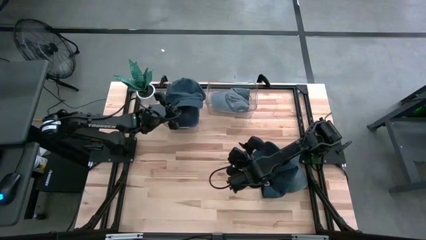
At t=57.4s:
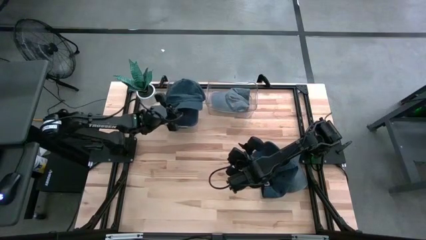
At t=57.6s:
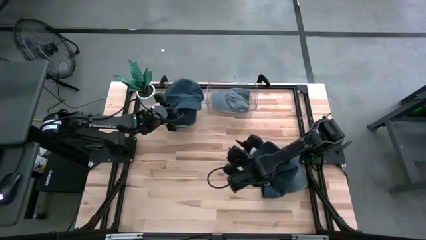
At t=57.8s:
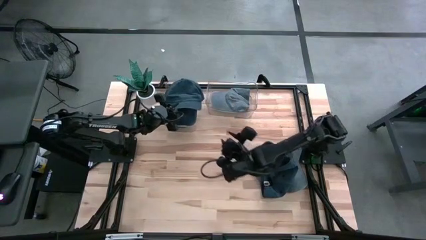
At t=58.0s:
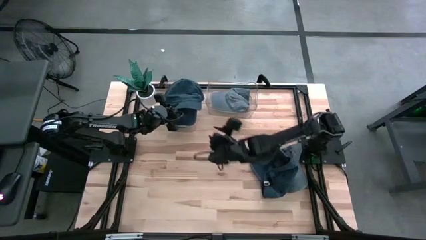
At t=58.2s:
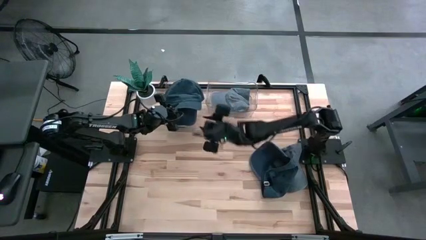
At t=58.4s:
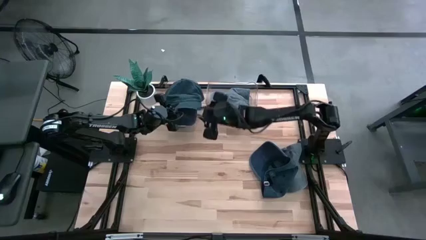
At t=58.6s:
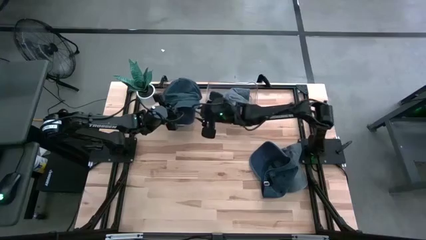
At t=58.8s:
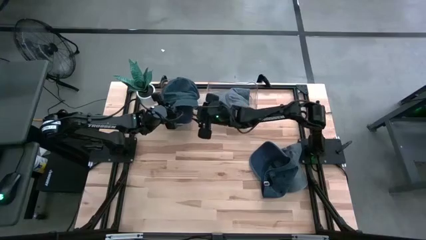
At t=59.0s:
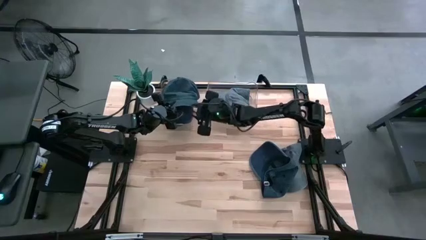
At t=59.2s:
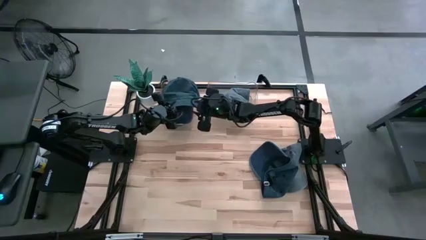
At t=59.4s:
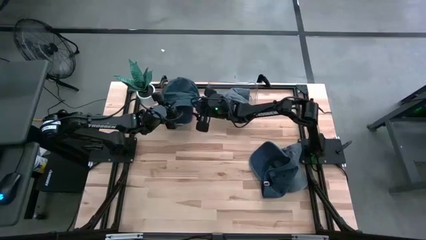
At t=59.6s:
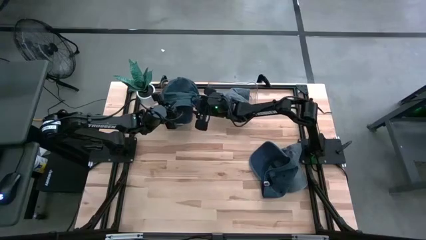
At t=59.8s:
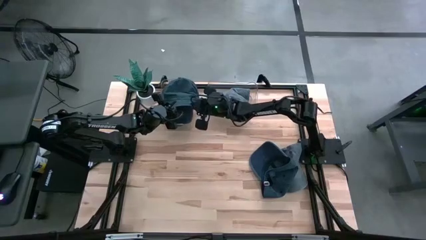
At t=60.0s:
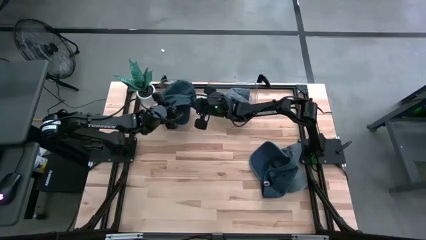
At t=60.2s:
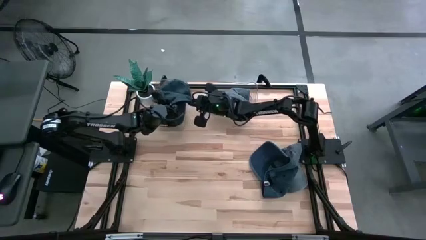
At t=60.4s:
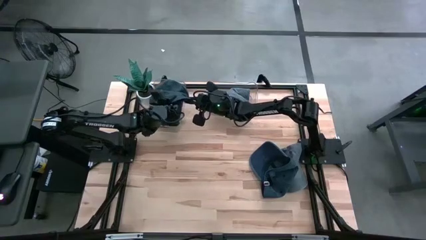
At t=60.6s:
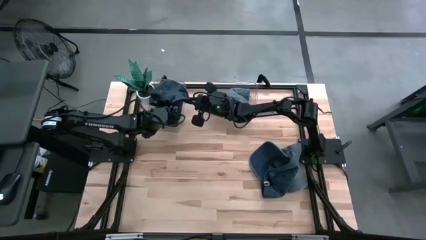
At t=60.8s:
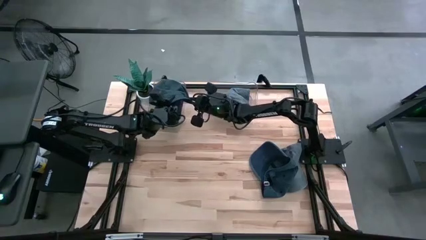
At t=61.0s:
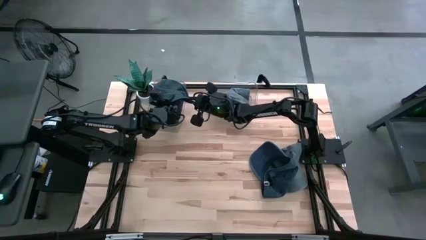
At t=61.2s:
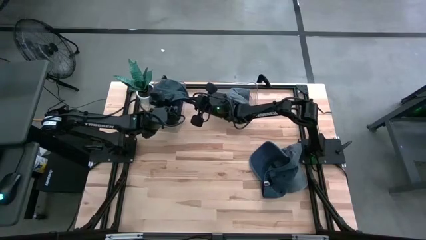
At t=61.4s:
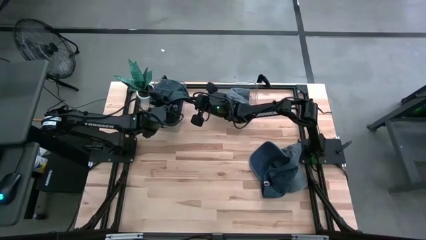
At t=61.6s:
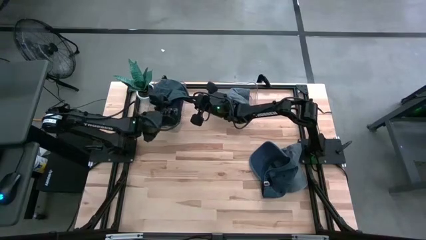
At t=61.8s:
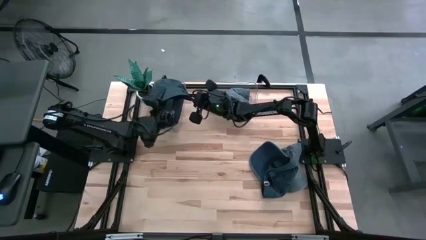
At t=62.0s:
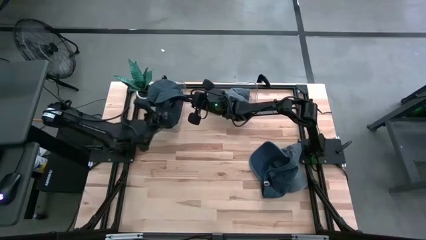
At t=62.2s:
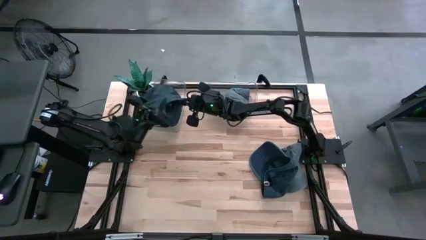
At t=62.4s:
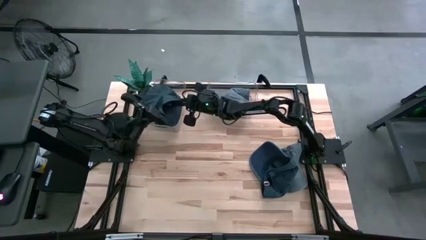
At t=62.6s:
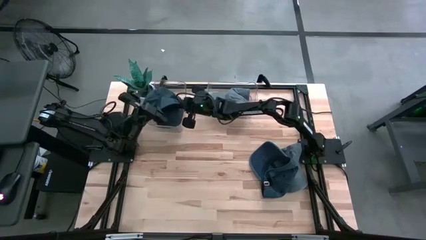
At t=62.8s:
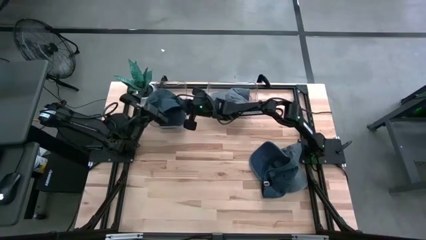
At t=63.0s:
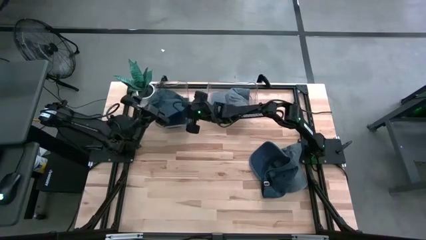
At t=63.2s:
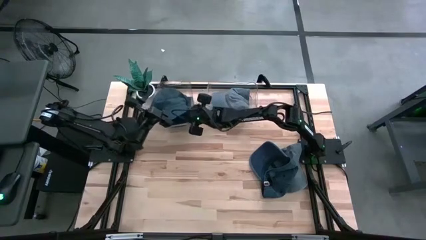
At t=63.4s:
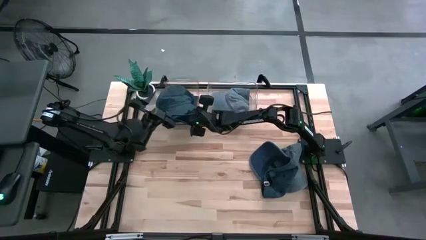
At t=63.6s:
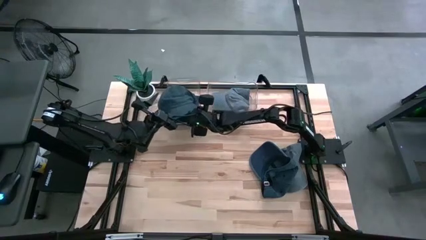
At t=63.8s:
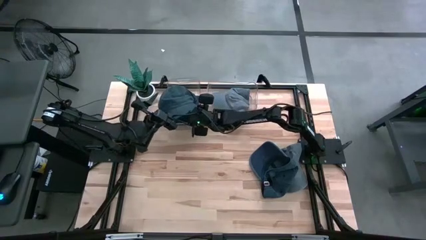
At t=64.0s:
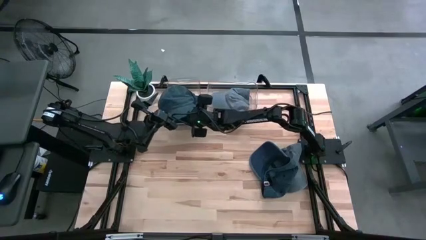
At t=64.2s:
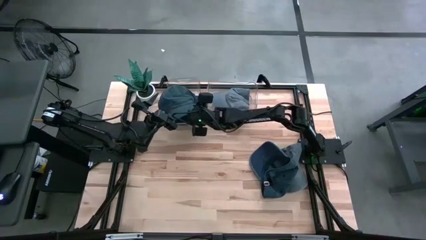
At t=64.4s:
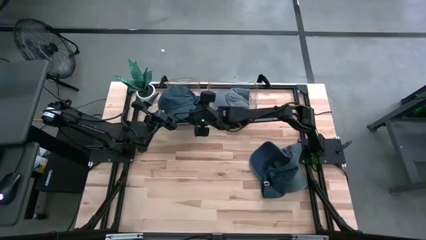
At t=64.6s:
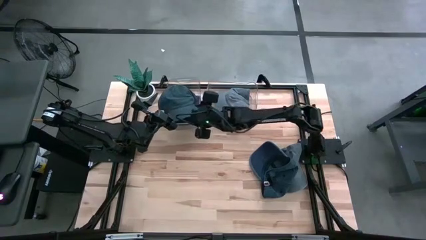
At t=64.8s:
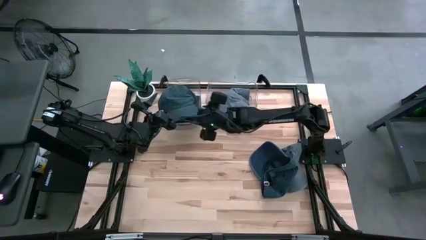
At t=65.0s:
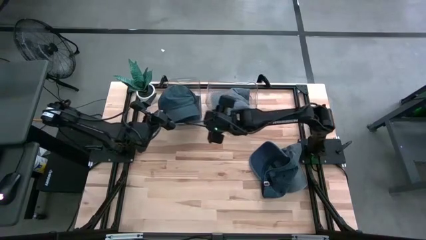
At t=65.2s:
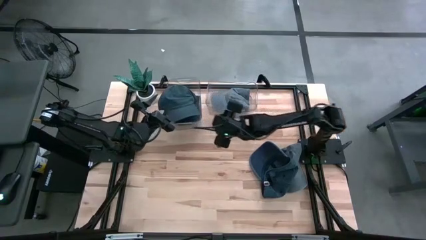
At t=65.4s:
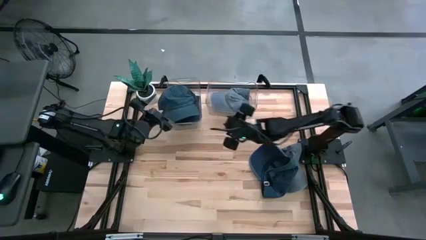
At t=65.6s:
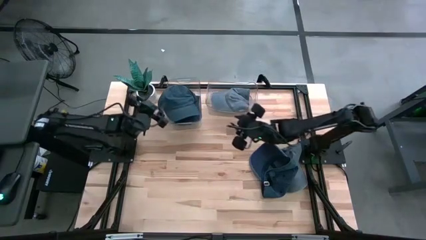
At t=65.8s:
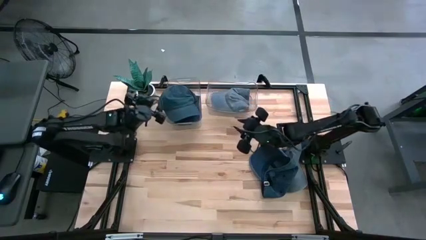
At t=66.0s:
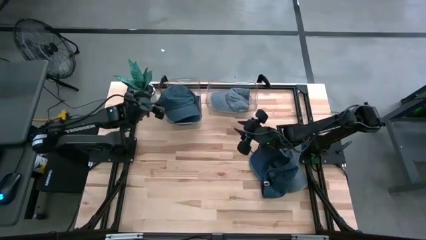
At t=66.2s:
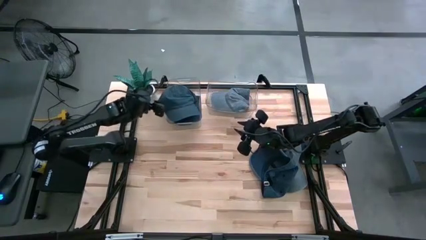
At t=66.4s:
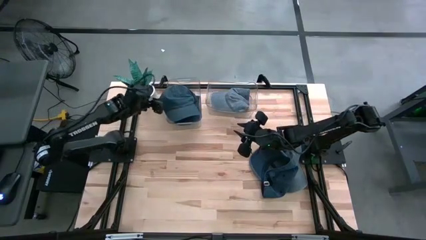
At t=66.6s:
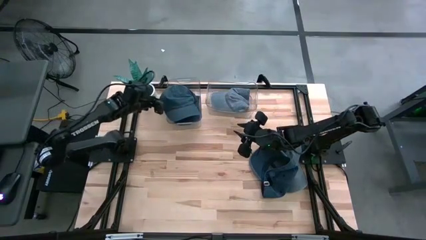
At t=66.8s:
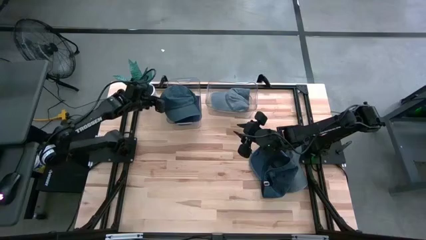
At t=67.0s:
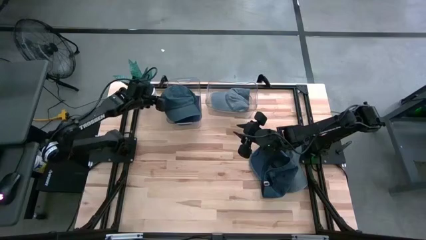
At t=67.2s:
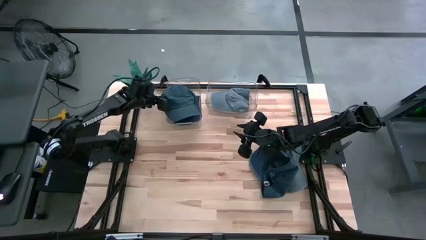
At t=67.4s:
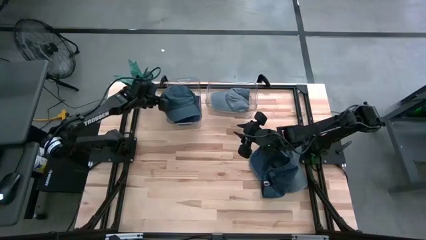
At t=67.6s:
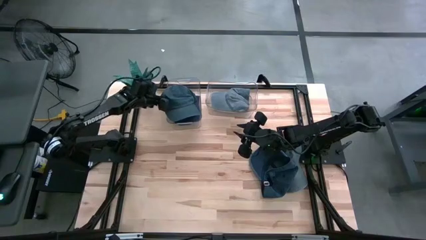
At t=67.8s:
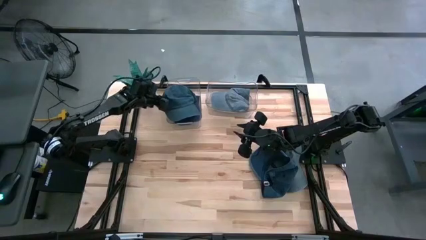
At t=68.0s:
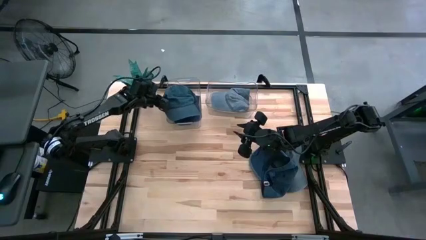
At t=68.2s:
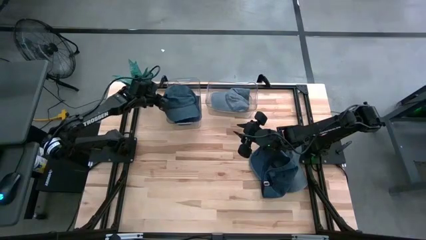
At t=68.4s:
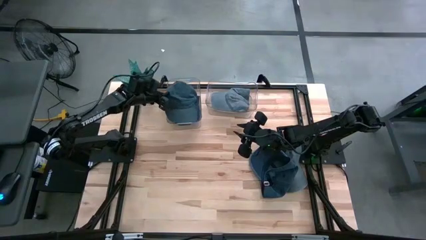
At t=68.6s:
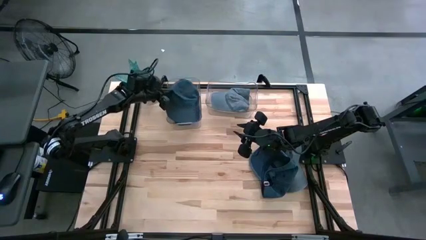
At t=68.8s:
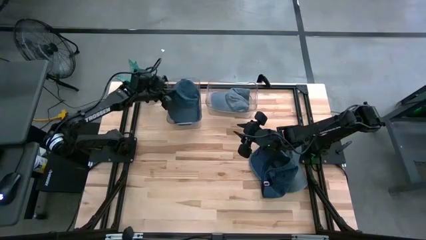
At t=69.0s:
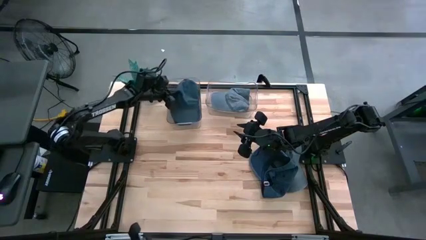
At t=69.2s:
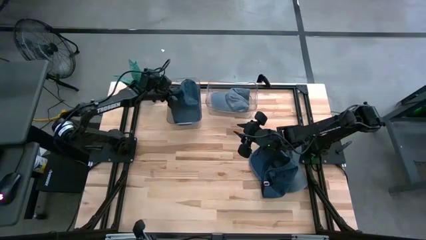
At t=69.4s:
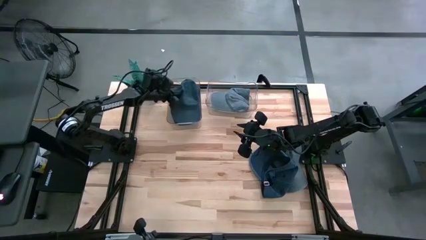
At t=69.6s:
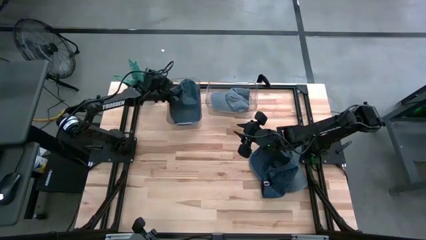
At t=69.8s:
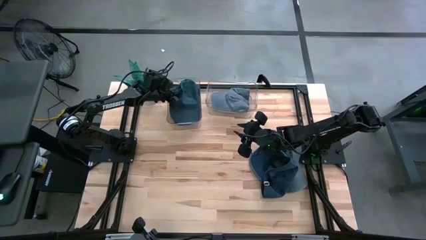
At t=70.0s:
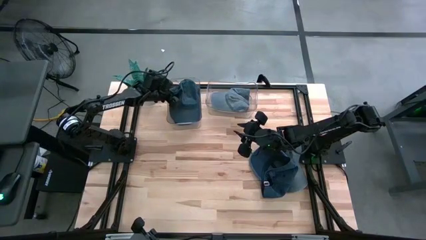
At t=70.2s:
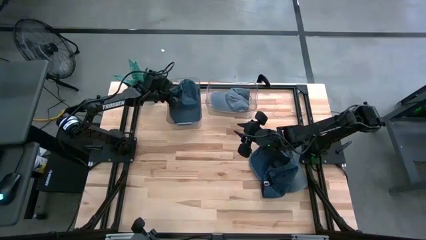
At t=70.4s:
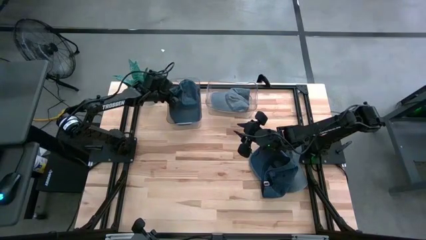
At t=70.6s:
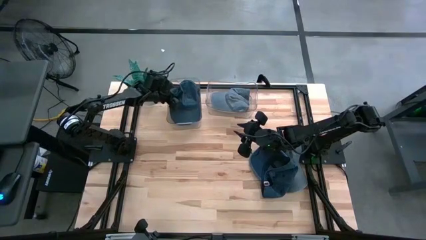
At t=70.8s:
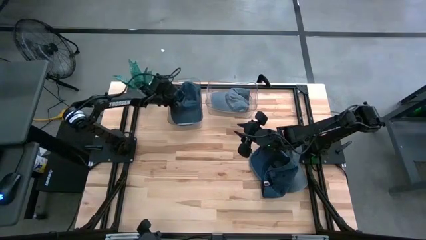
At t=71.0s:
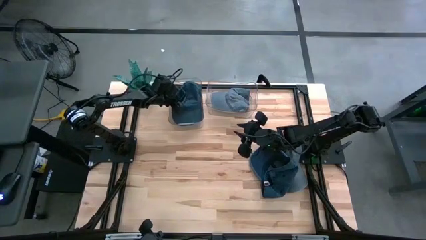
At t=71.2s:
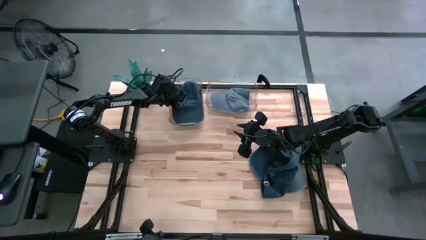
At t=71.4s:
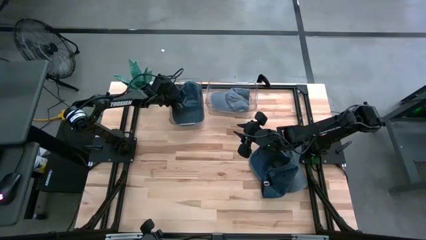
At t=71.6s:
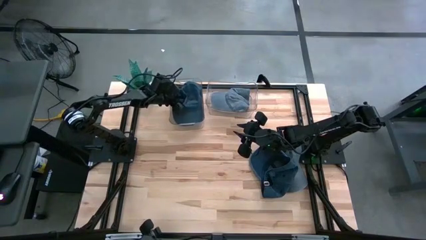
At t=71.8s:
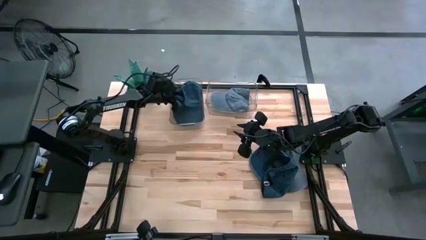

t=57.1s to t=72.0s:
Task: Pick & Place hat
Put the top blue cap into the left transparent bin
